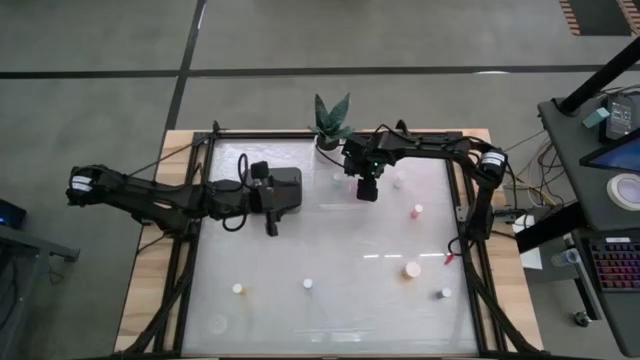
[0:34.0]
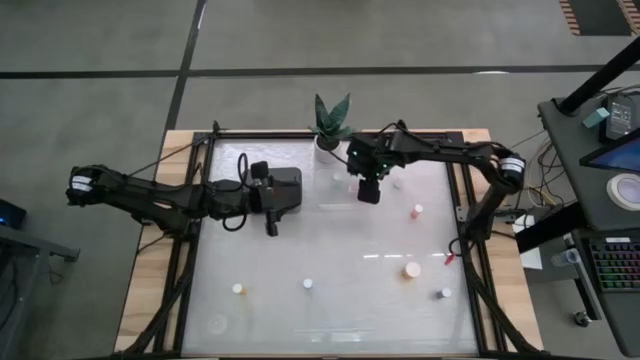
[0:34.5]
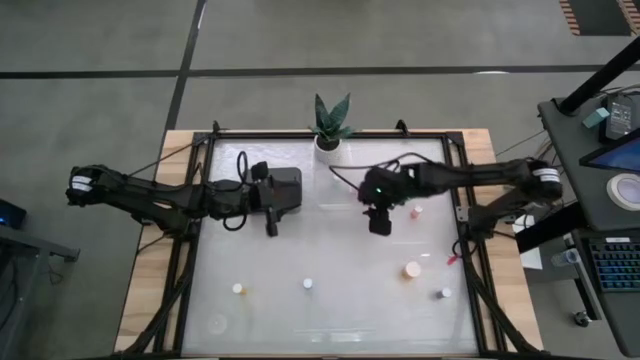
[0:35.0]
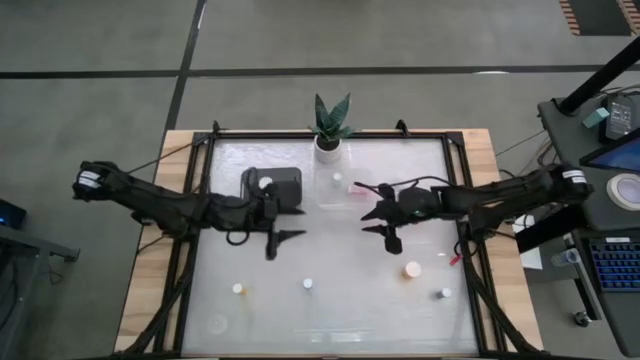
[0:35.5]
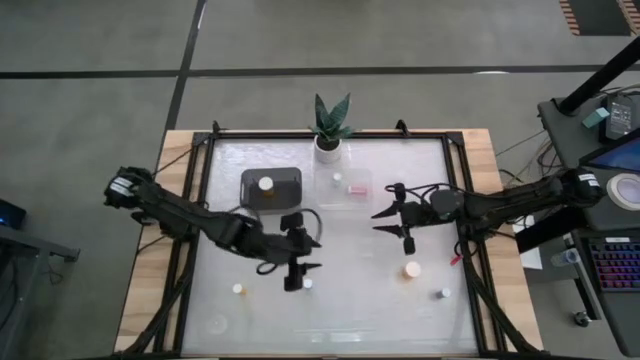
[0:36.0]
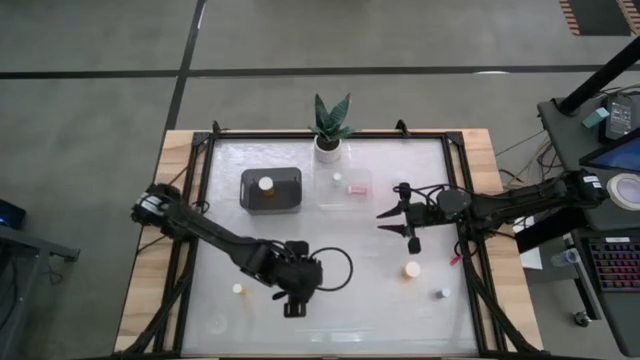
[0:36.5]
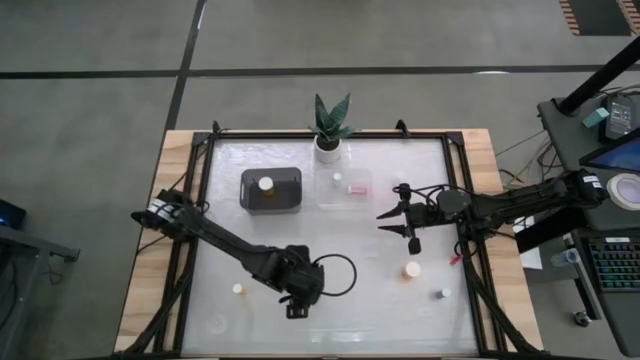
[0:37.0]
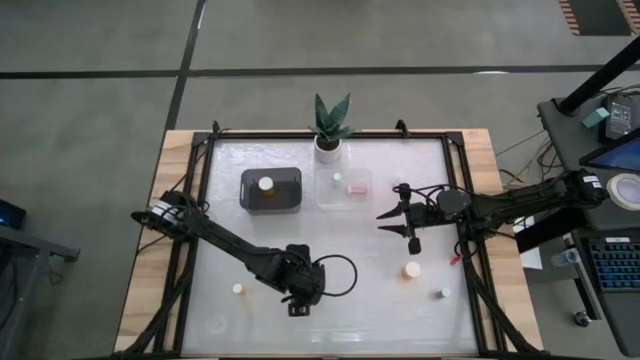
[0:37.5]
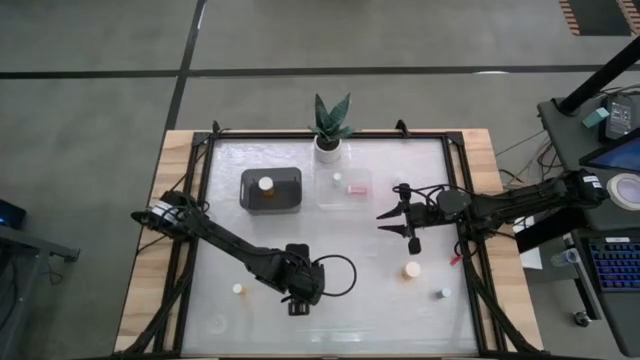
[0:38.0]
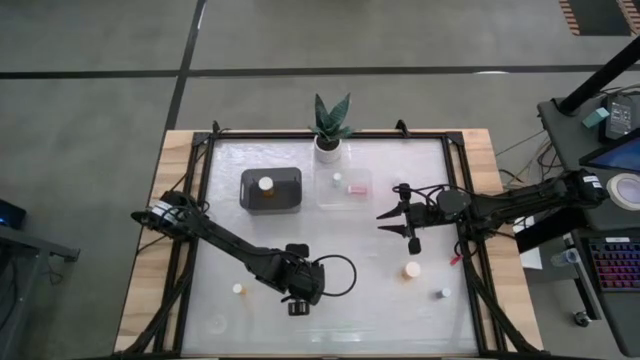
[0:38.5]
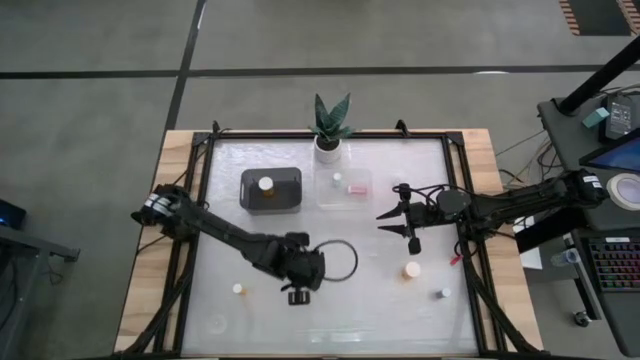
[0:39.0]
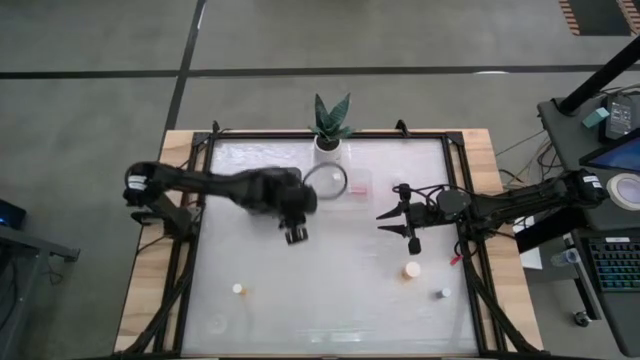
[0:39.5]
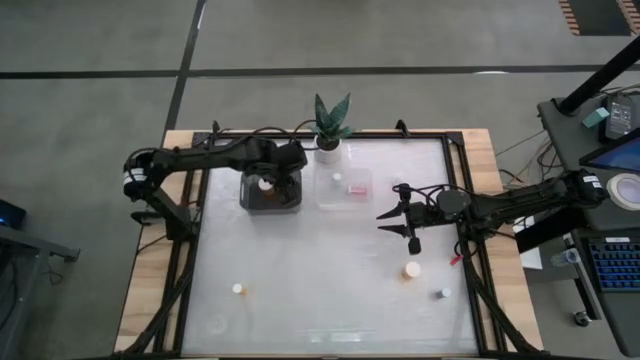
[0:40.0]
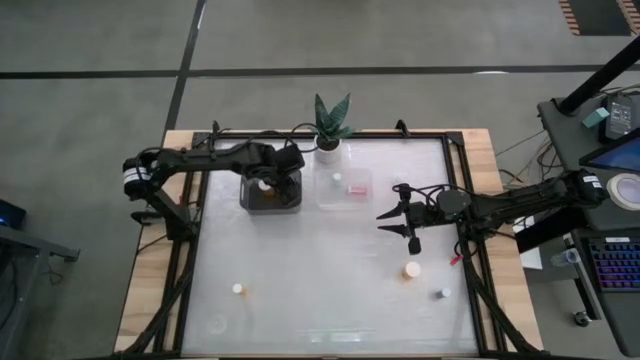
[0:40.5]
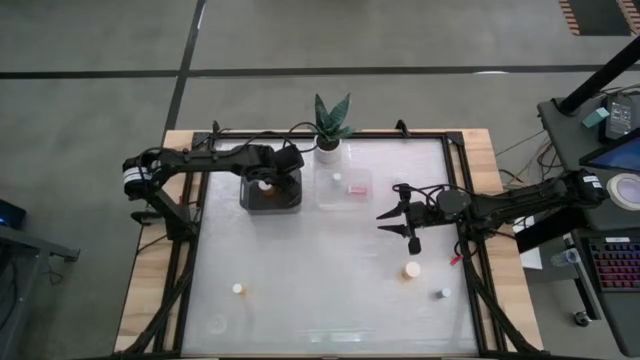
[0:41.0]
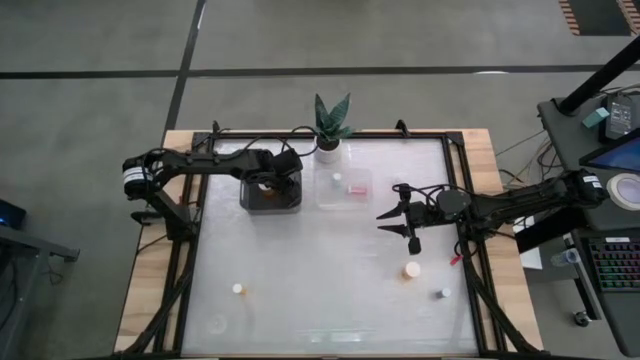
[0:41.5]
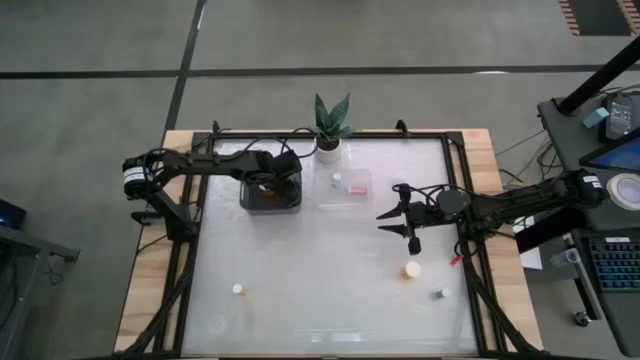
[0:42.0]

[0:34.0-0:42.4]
Task: Pick and place medicine bottles into bin by pill shape (circle, oval)
Put the left blue capsule bottle into the black bin

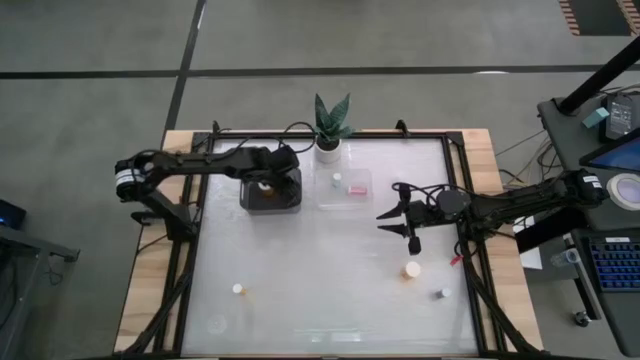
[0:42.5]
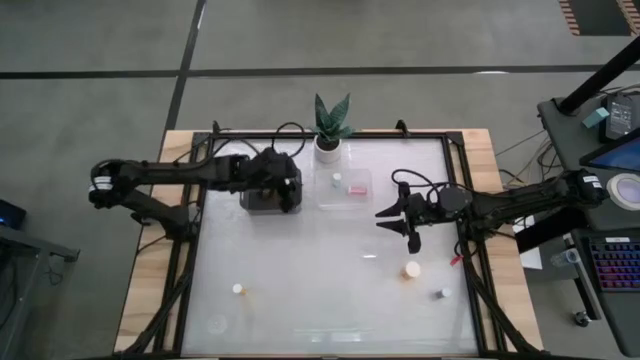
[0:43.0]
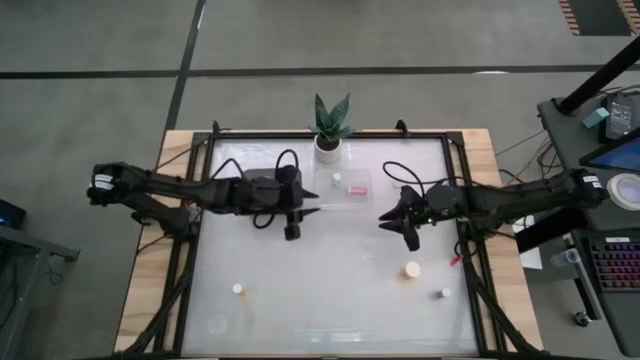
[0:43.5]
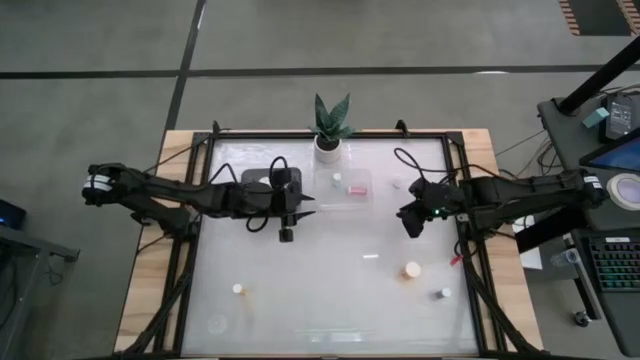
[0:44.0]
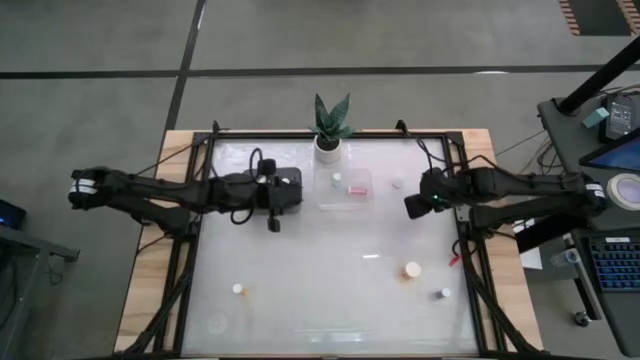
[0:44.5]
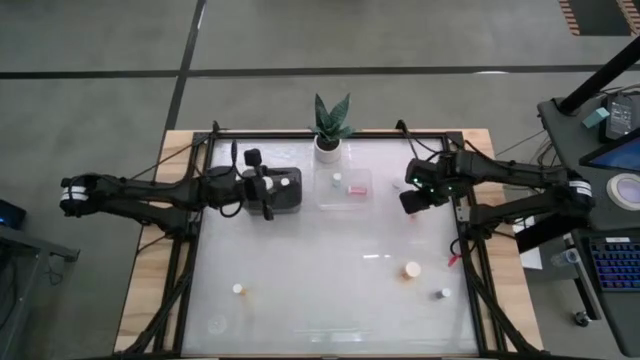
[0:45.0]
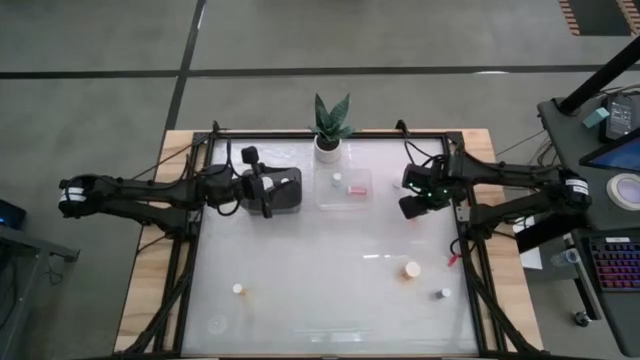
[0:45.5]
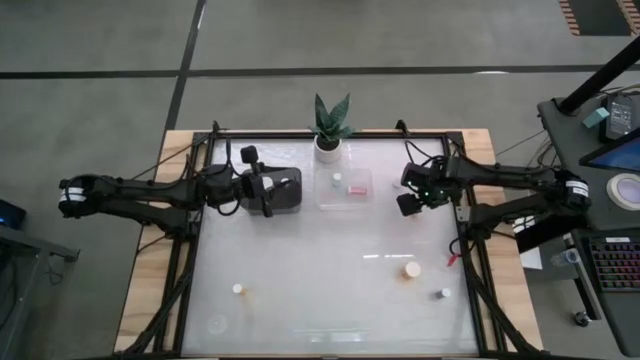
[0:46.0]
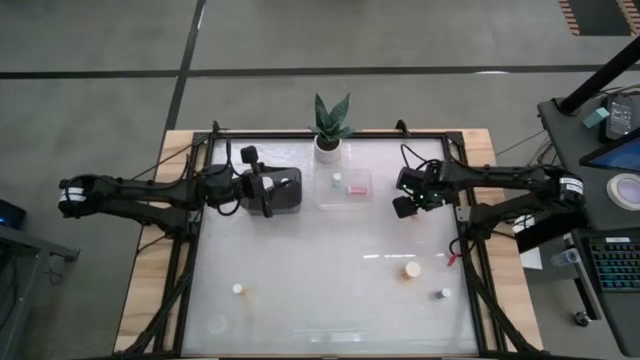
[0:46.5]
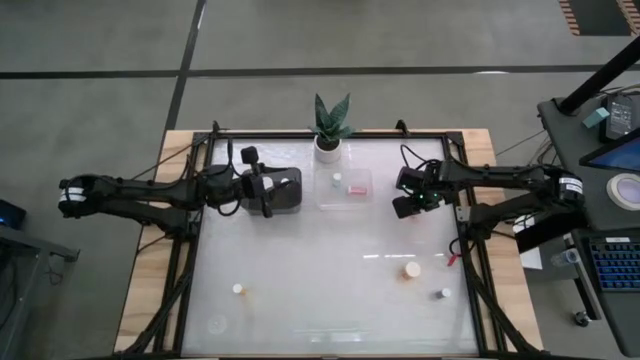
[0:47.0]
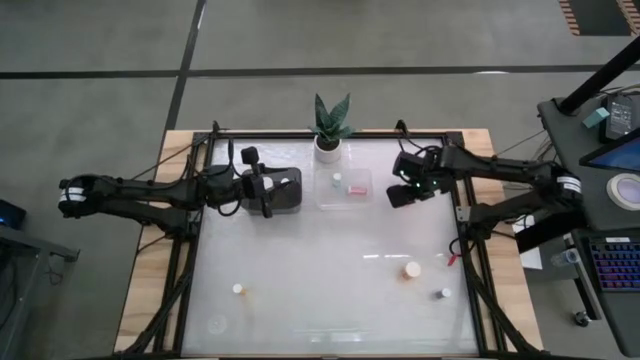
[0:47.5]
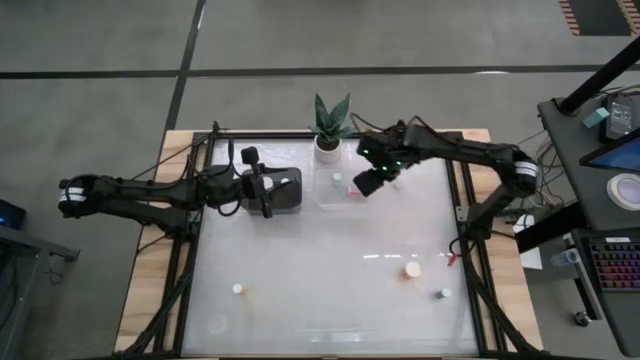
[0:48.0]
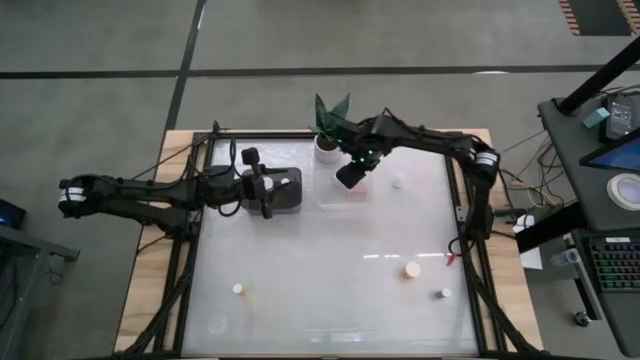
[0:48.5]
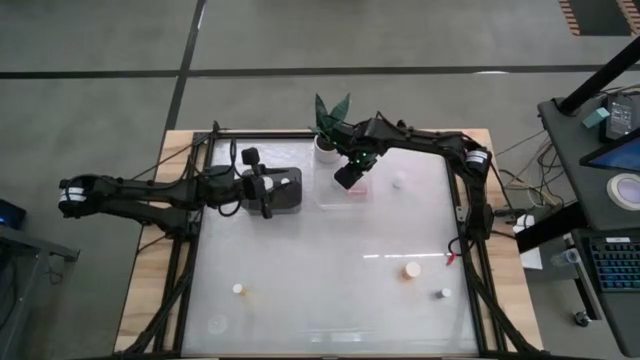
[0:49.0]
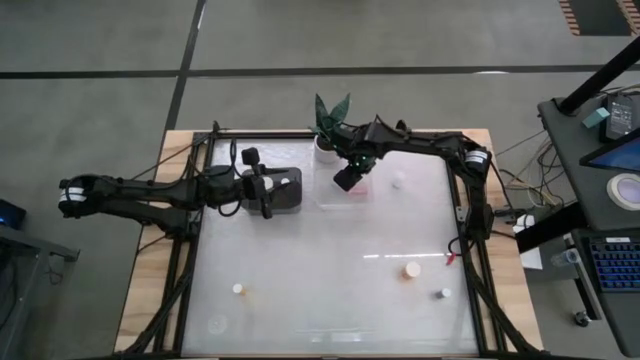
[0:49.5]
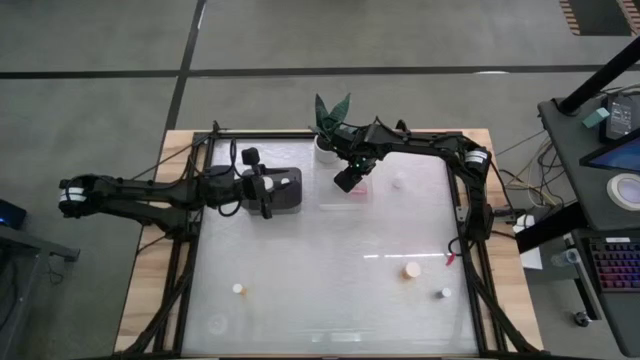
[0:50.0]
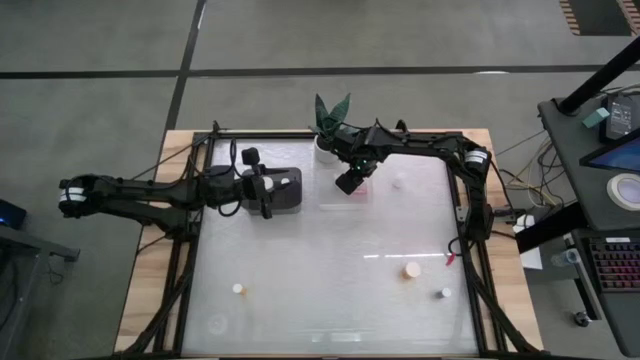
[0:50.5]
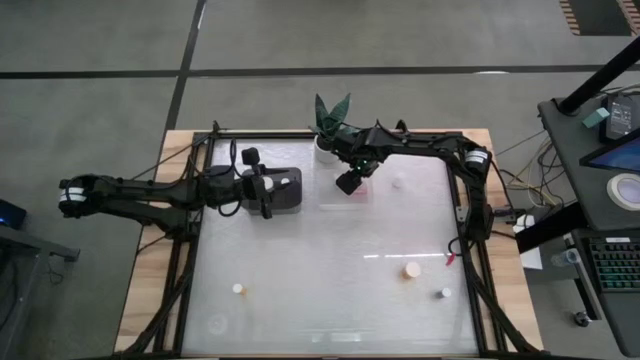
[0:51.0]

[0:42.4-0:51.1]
Put the top small orange tablet bottle into the transparent bin

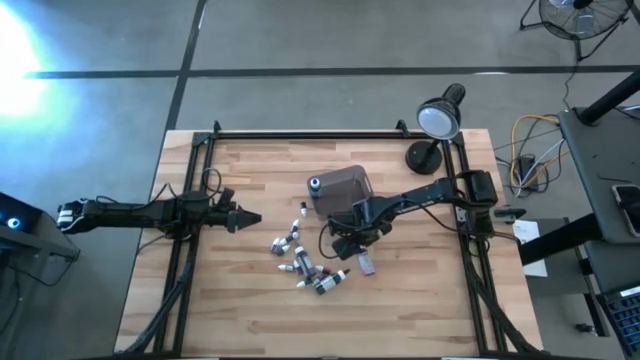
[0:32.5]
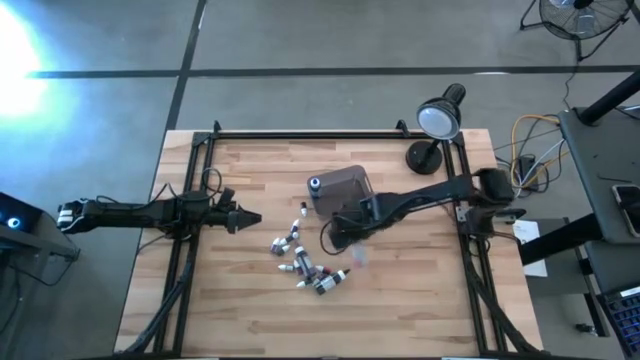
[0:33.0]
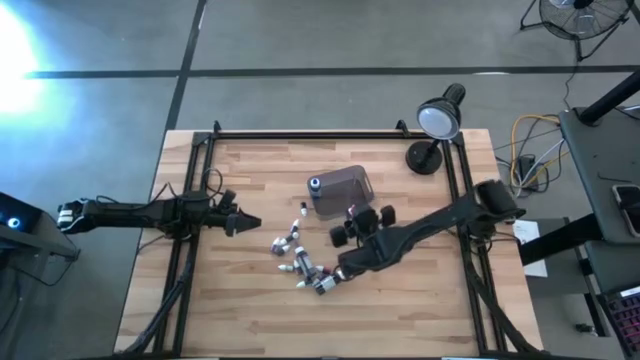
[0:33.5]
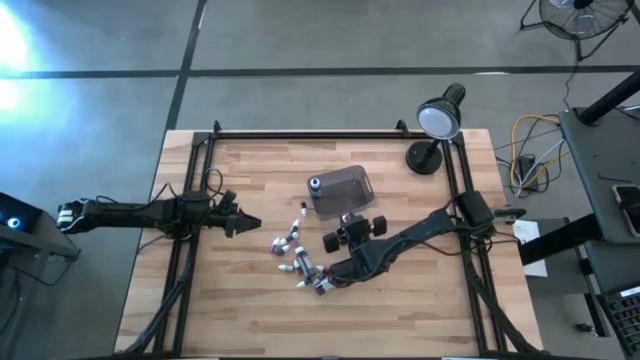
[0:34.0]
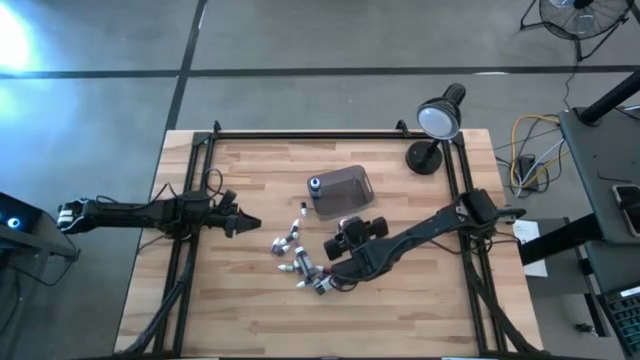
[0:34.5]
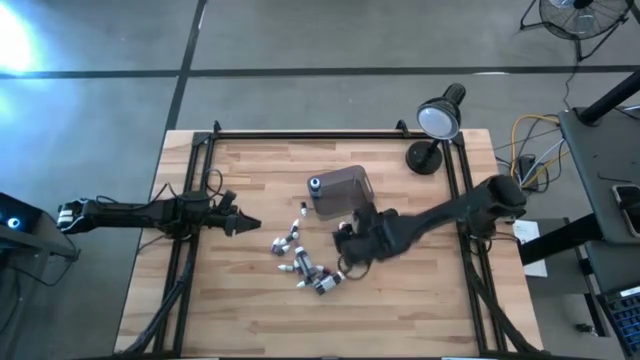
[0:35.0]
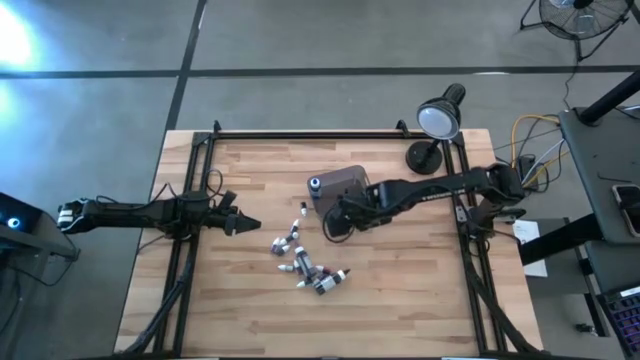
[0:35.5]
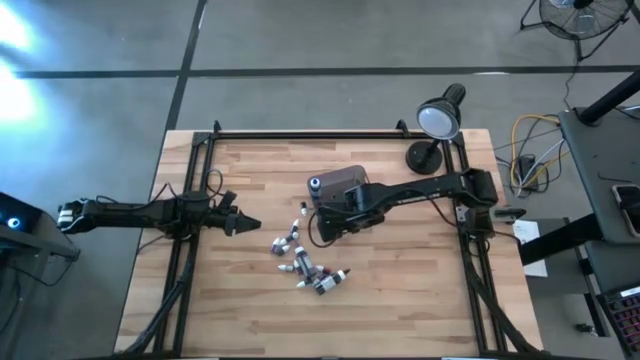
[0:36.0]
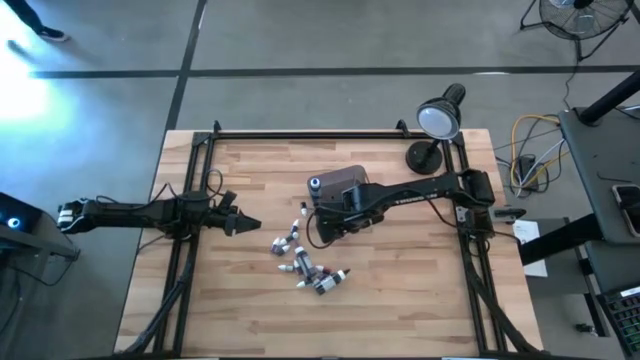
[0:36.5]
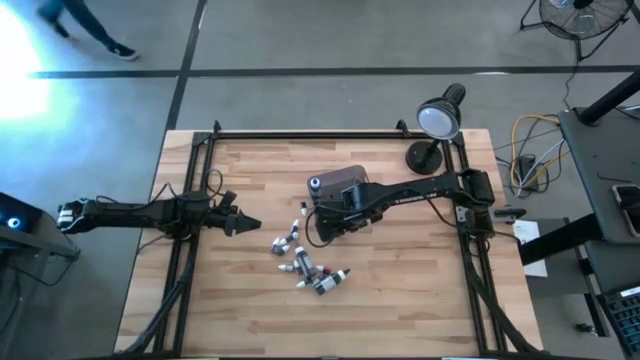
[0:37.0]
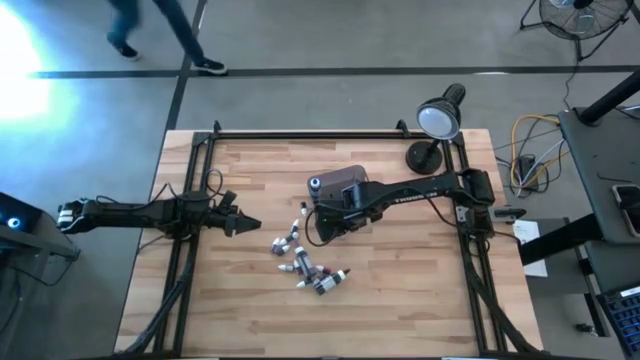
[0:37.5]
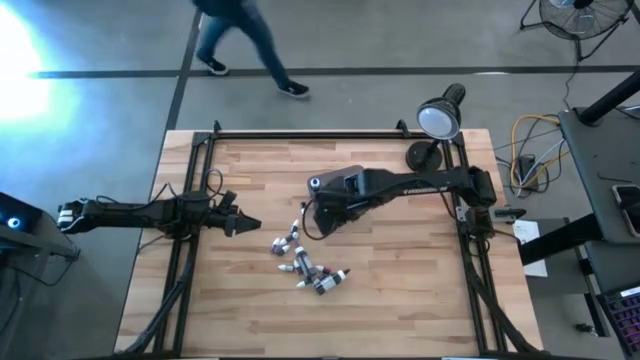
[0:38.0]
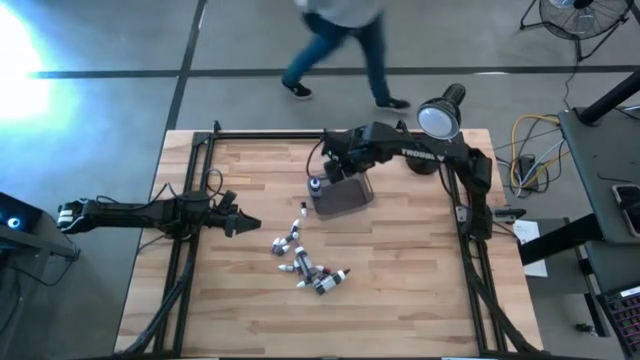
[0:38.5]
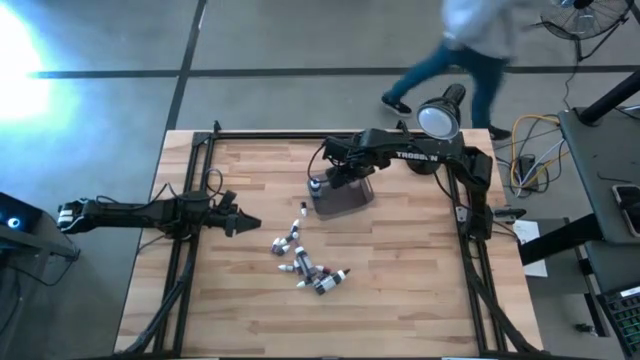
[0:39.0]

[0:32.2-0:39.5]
Task: Pick & Place food coloring
Put the big pink food coloring bottle into the black transparent bin
